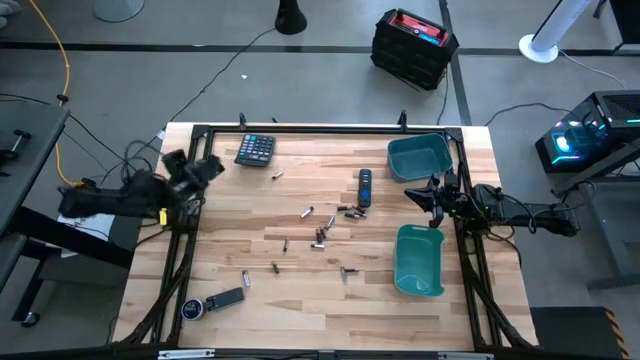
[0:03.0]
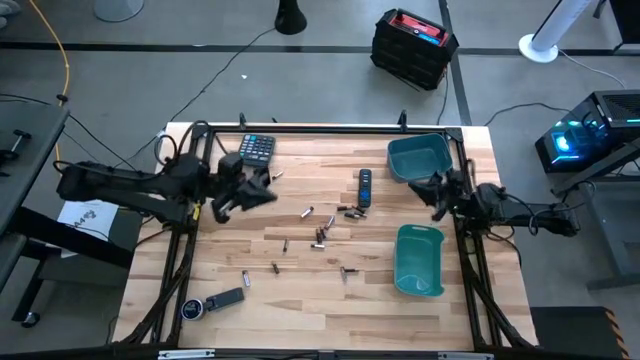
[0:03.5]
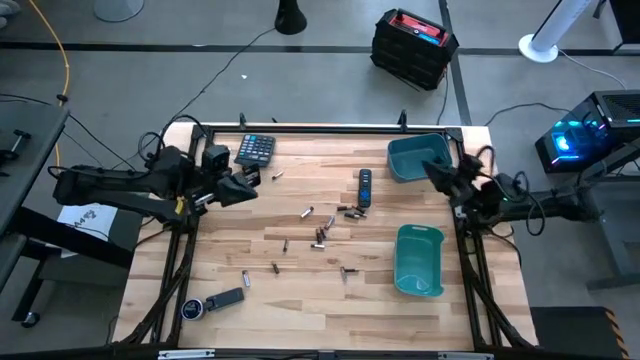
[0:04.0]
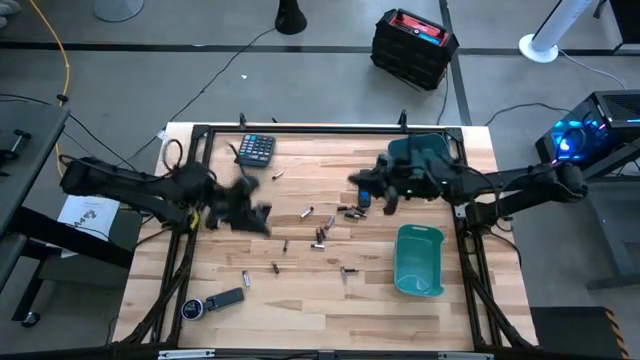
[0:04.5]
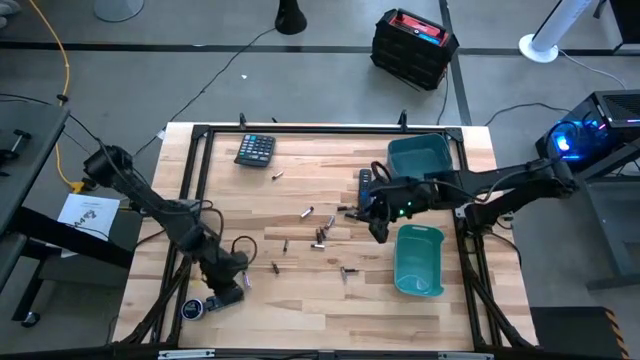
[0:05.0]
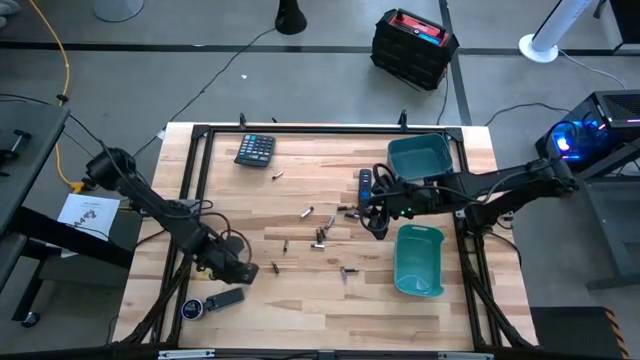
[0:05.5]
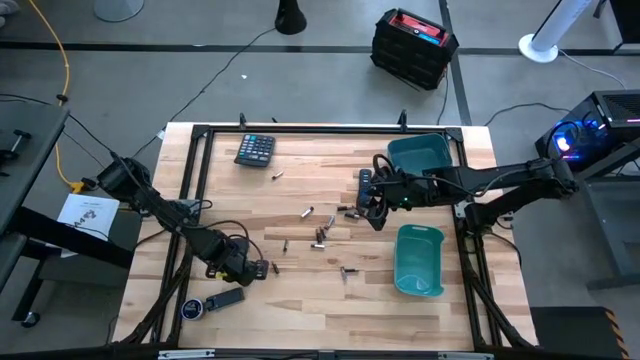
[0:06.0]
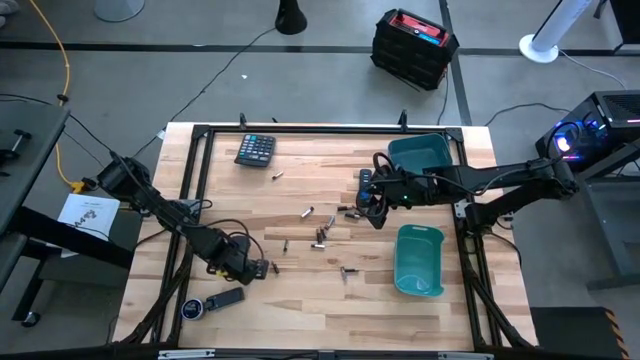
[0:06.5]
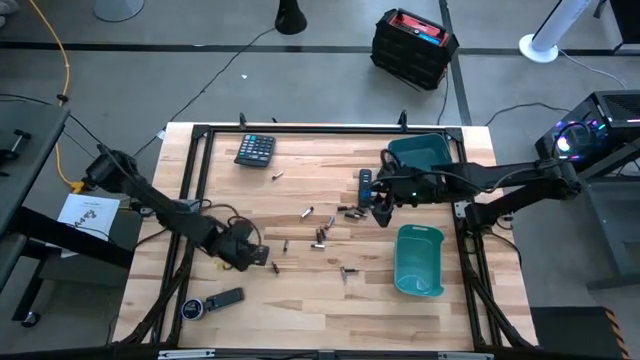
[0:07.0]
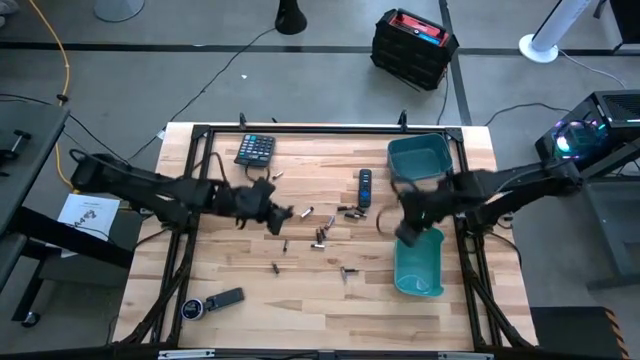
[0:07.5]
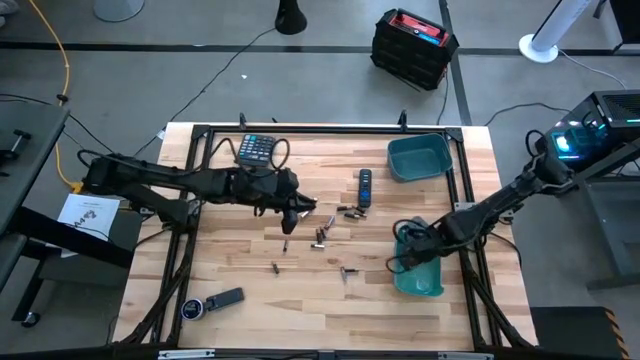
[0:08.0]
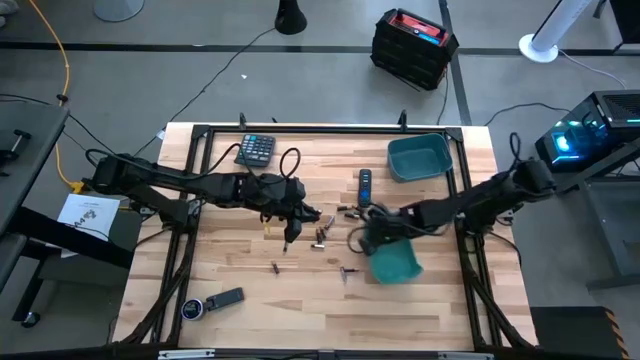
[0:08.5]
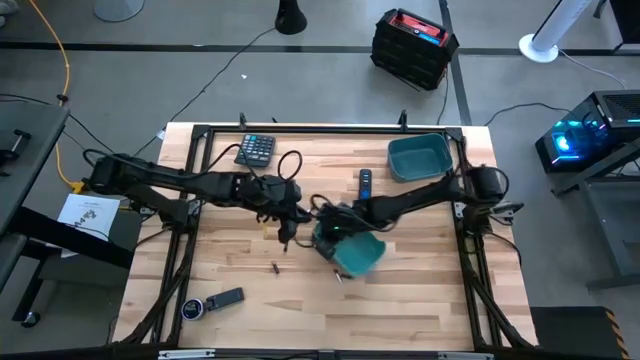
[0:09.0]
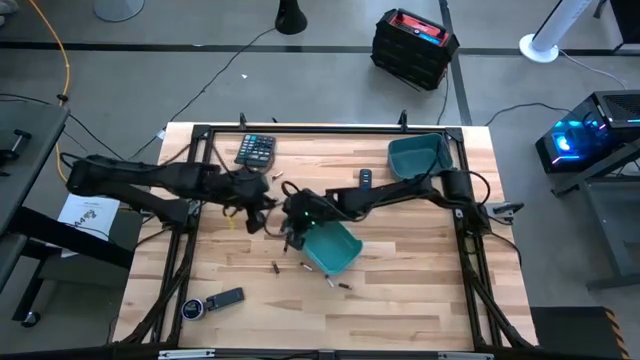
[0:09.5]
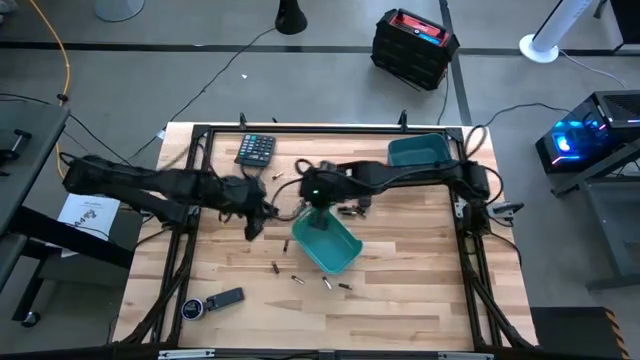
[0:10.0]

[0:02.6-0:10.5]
Task: Sort batteries
Put the white battery into the green bin

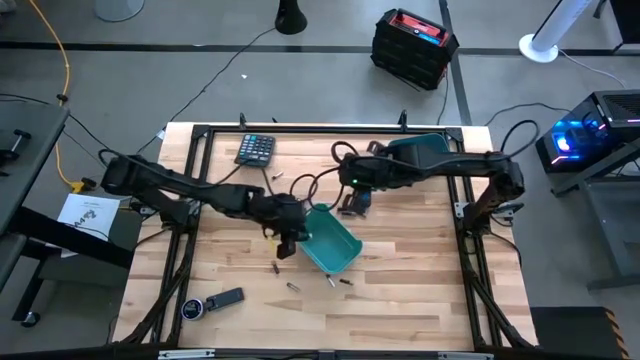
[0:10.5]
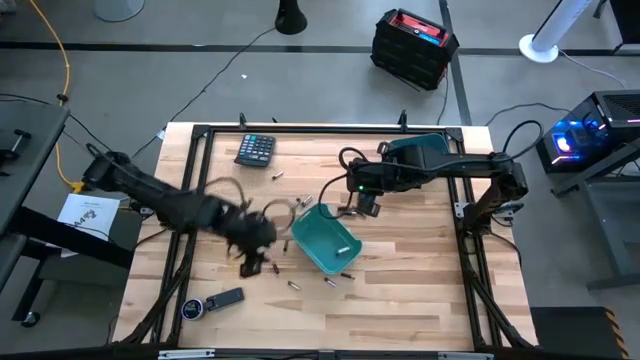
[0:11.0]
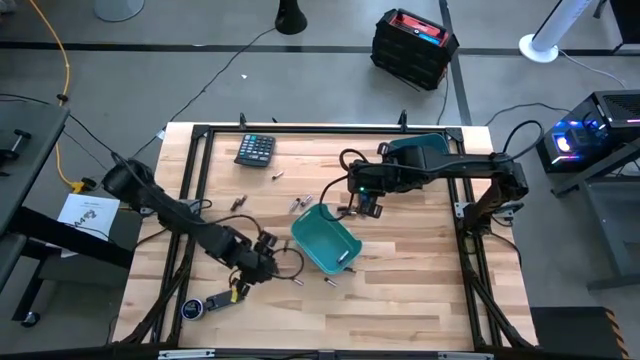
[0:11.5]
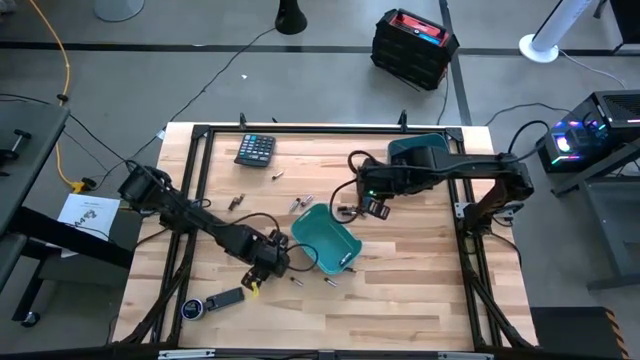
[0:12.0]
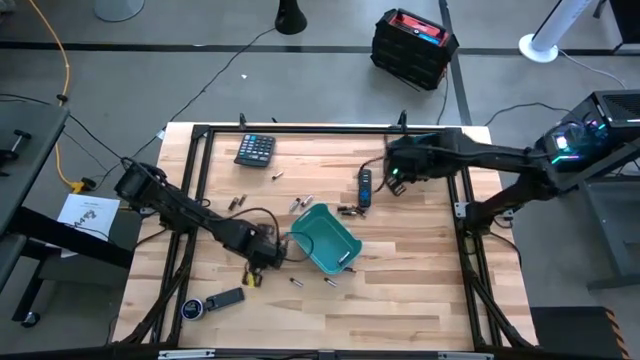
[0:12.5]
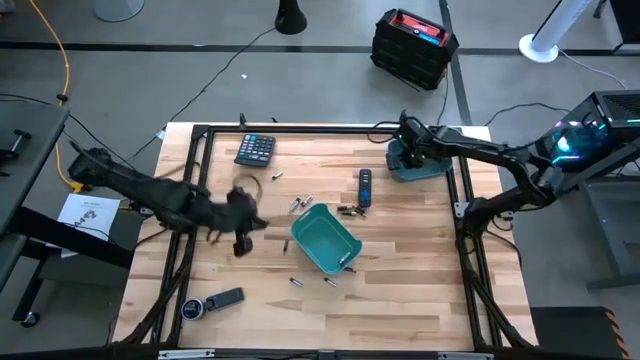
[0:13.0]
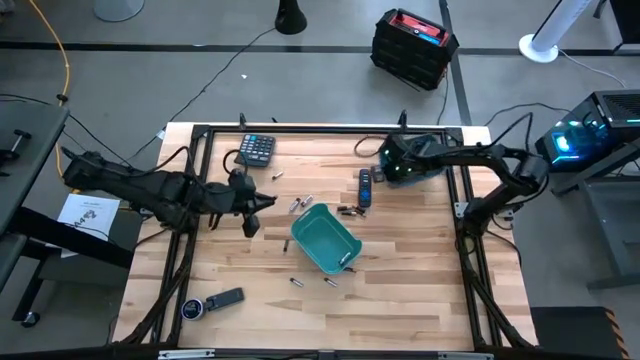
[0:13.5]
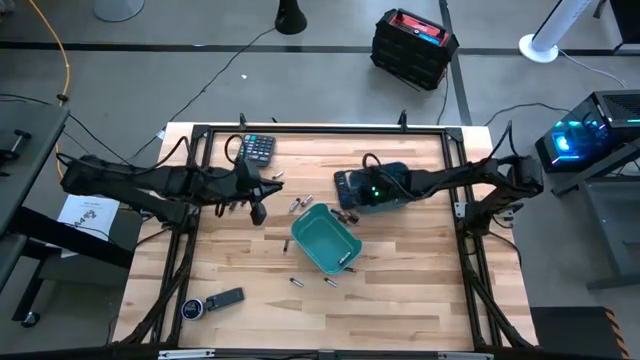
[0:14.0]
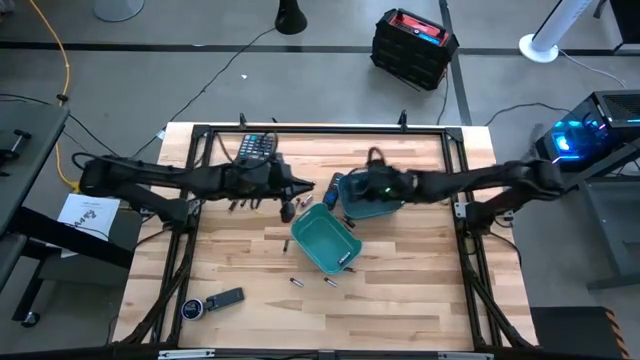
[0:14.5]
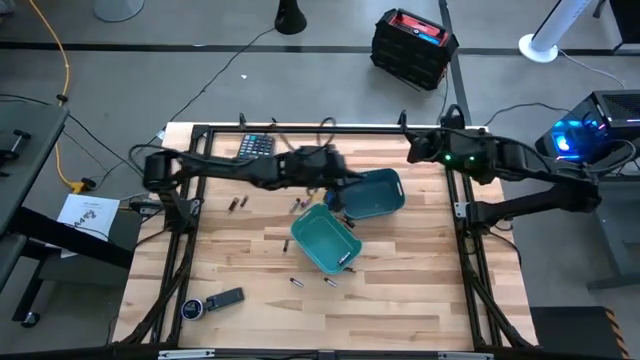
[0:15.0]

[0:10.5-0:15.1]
Put the black battery into the blue bin

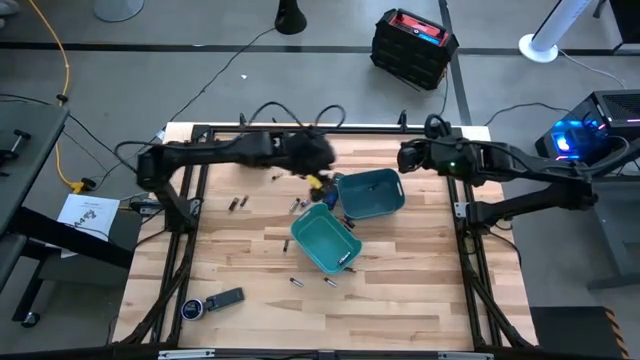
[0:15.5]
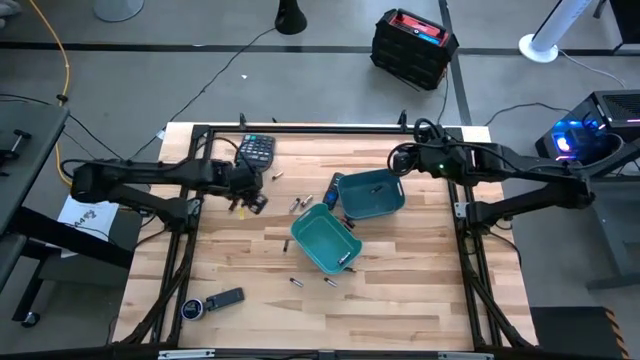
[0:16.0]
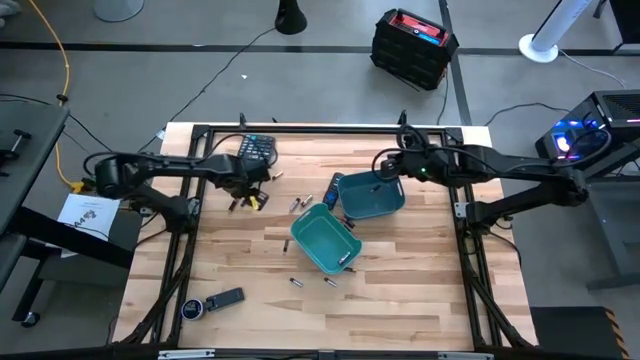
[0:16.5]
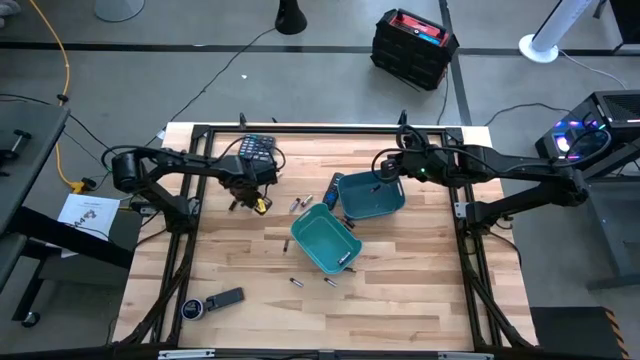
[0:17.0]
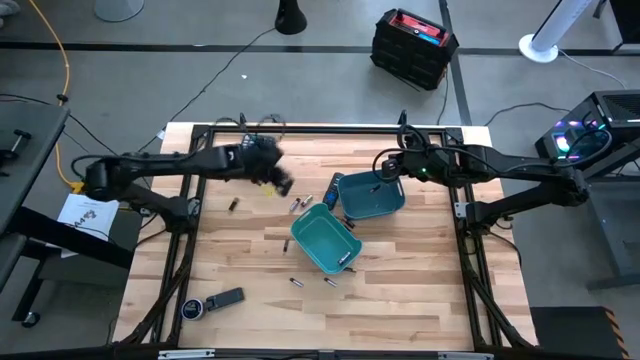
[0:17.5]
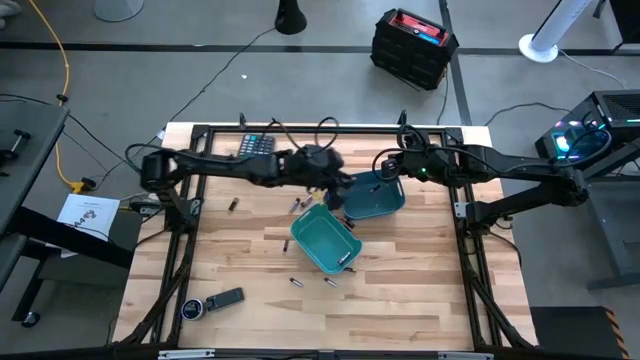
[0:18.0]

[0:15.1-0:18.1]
Put the black battery into the blue bin

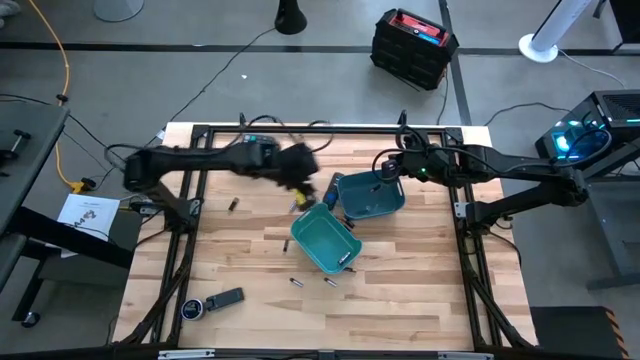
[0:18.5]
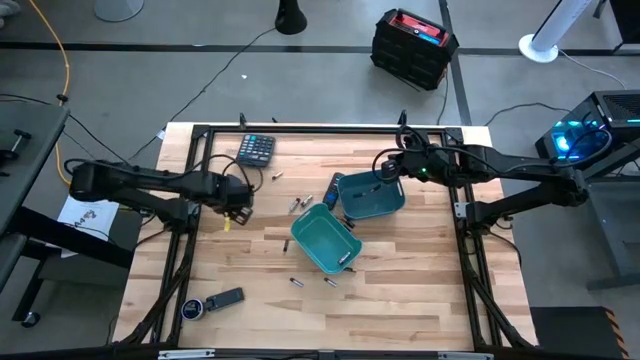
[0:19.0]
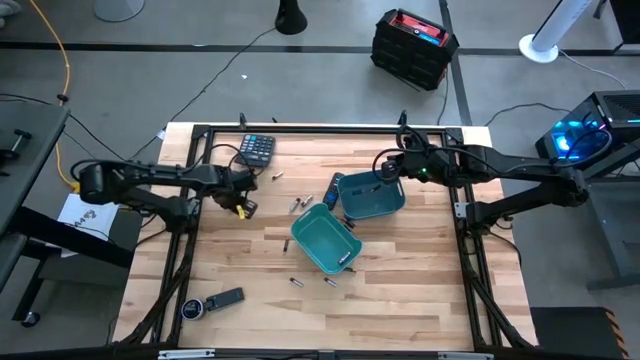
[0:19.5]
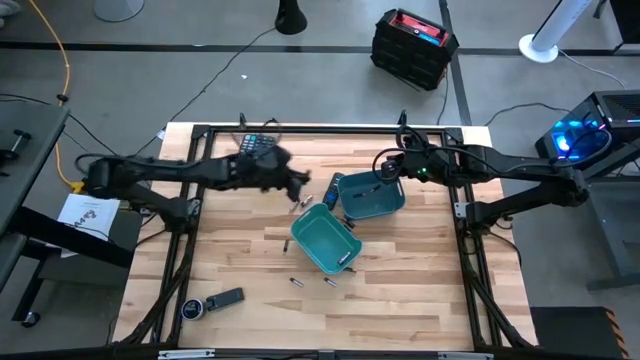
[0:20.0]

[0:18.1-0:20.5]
Put the black battery into the blue bin

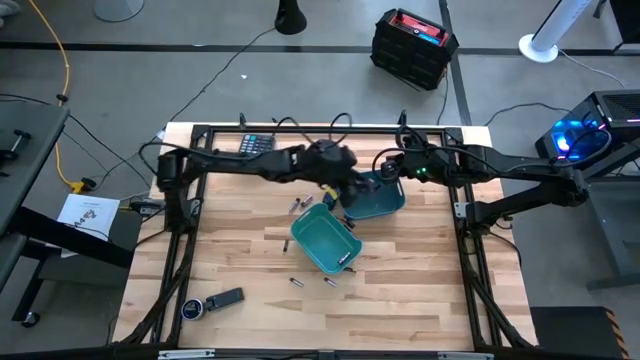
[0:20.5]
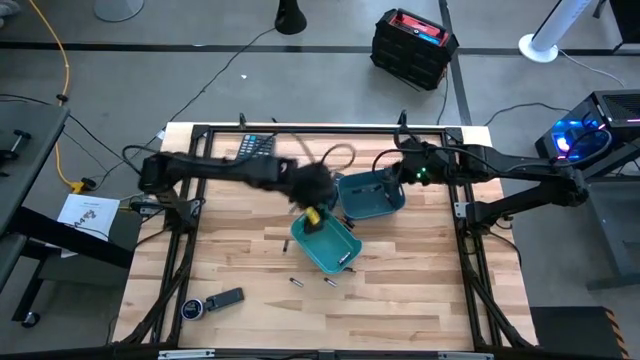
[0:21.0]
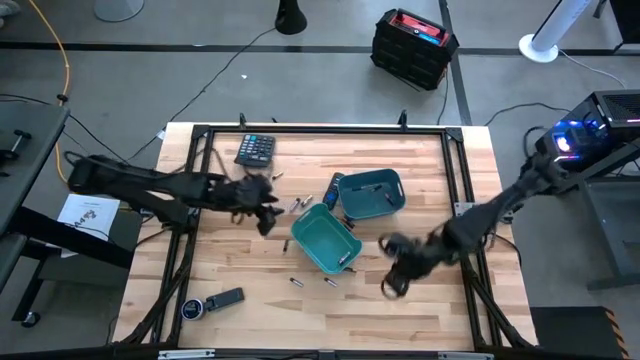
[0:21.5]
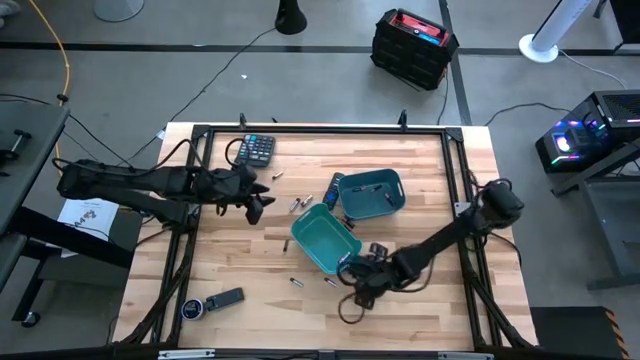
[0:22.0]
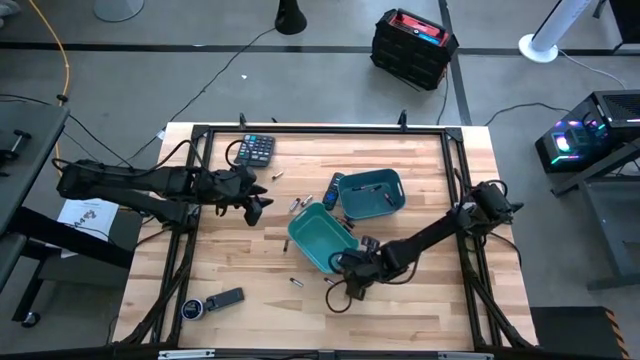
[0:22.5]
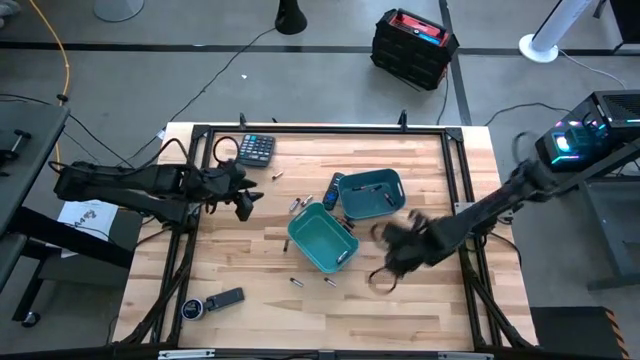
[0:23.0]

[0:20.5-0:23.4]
Put the black battery into the blue bin

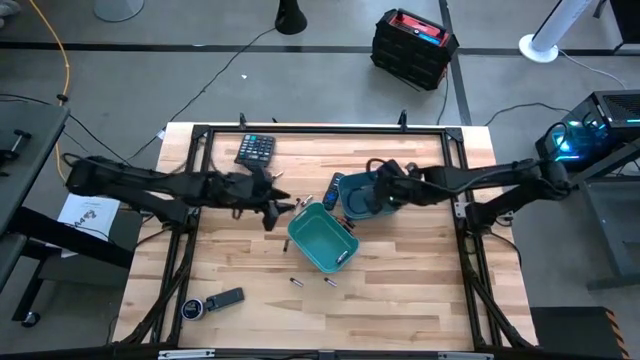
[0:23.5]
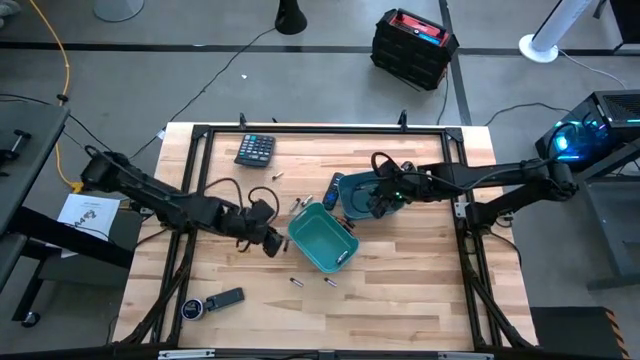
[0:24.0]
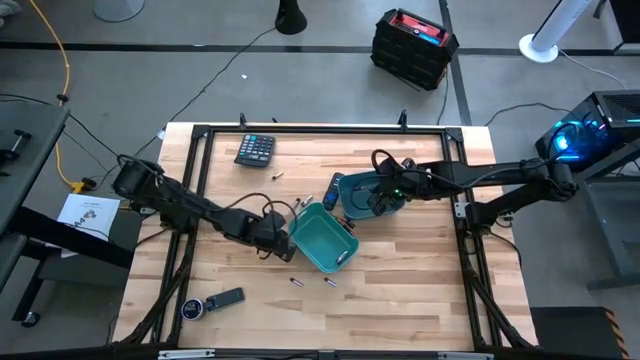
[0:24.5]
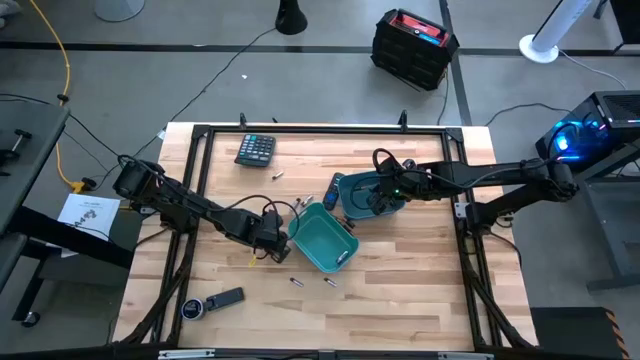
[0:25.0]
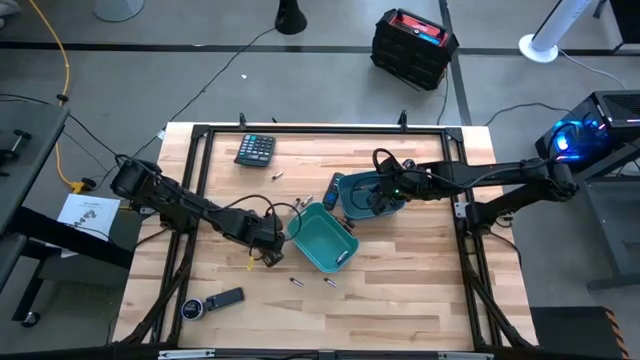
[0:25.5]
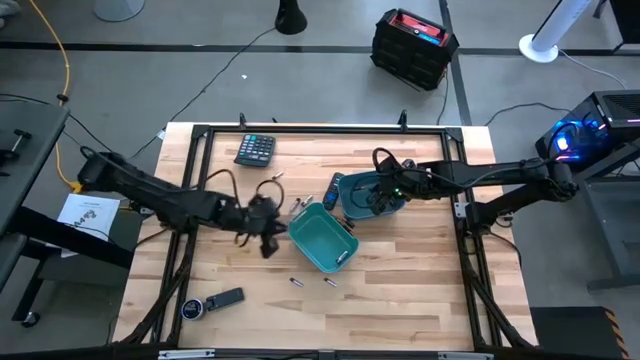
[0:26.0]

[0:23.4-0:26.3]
Put the white battery into the green bin
